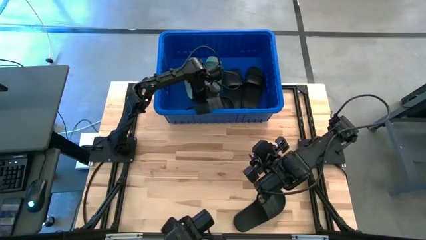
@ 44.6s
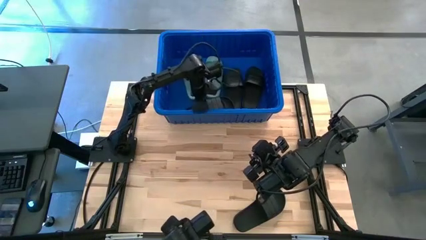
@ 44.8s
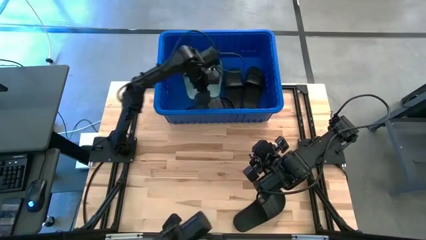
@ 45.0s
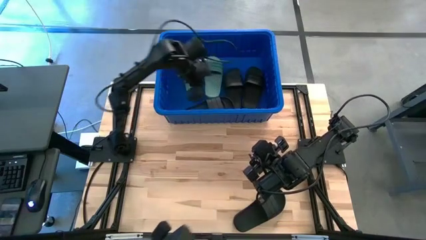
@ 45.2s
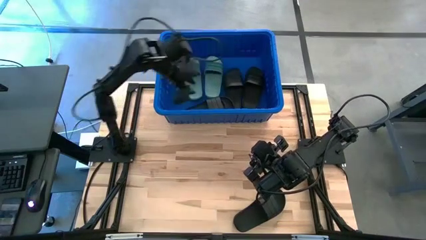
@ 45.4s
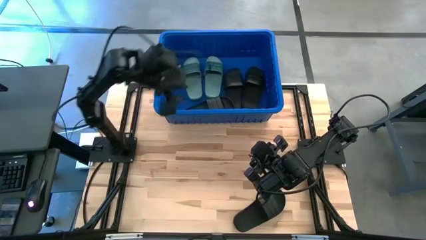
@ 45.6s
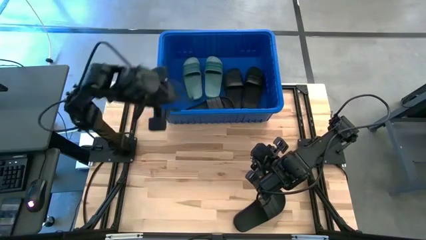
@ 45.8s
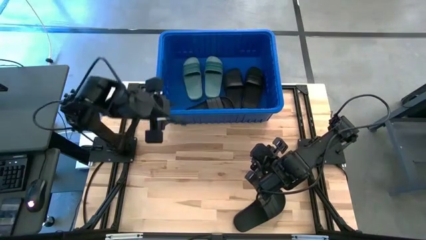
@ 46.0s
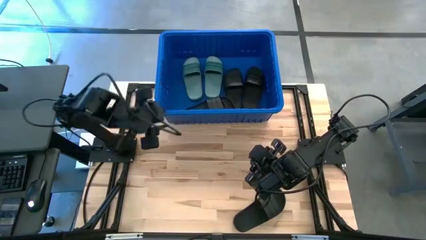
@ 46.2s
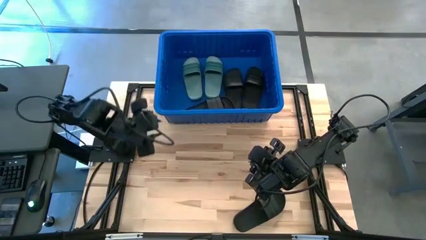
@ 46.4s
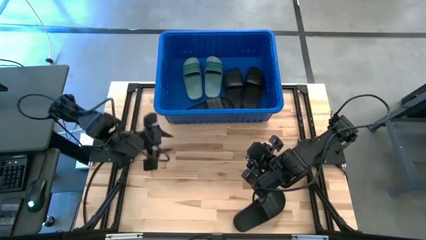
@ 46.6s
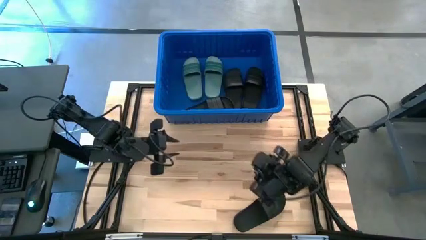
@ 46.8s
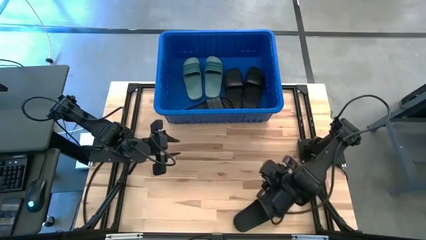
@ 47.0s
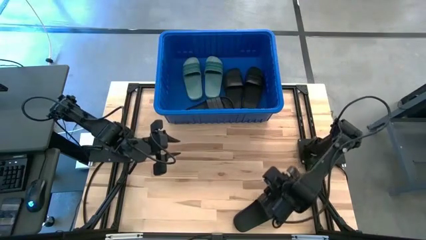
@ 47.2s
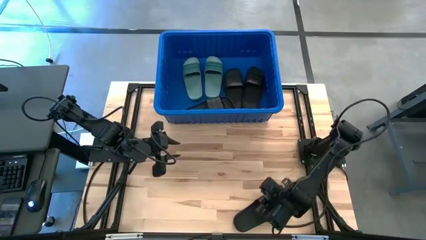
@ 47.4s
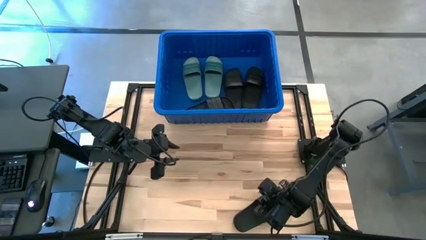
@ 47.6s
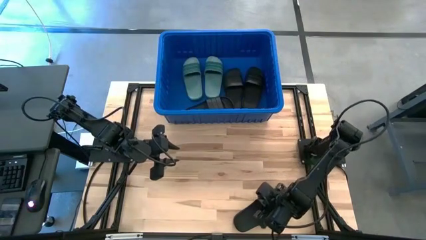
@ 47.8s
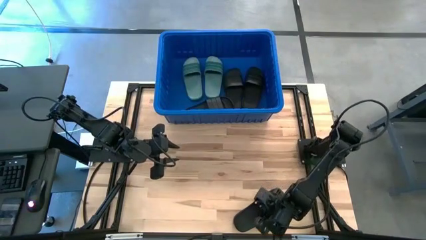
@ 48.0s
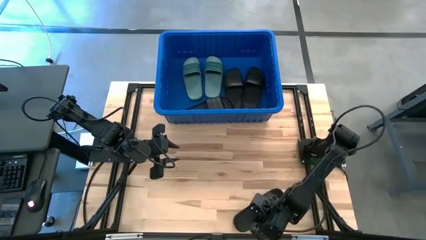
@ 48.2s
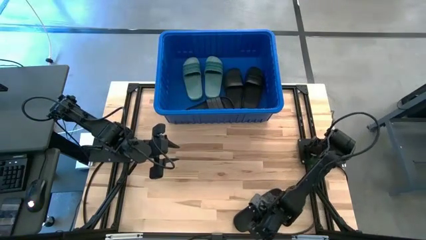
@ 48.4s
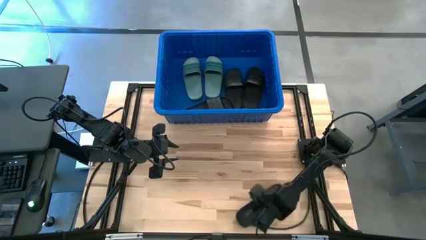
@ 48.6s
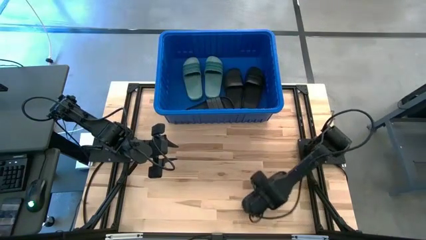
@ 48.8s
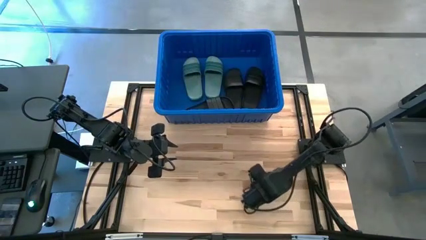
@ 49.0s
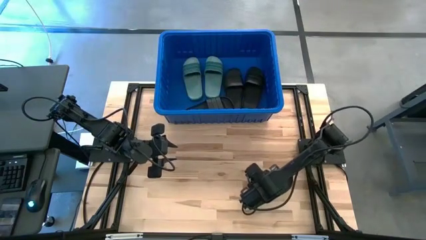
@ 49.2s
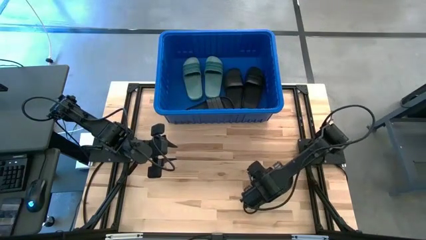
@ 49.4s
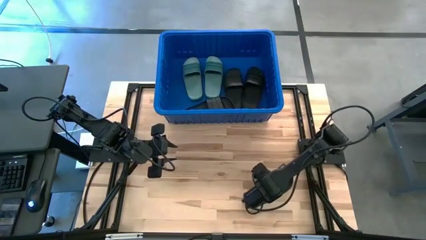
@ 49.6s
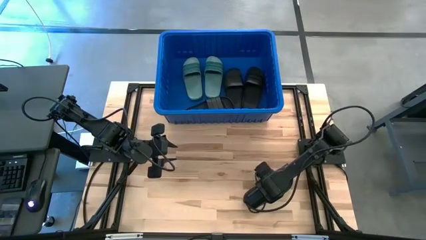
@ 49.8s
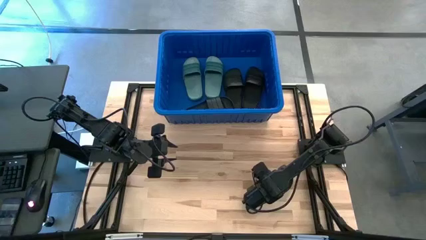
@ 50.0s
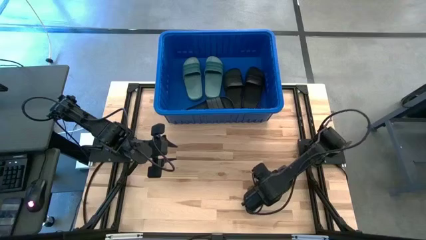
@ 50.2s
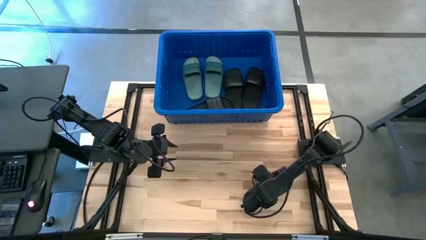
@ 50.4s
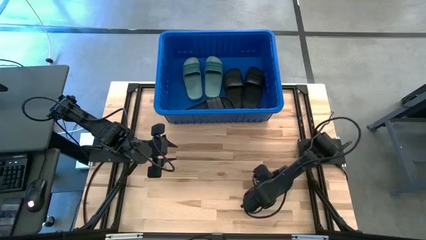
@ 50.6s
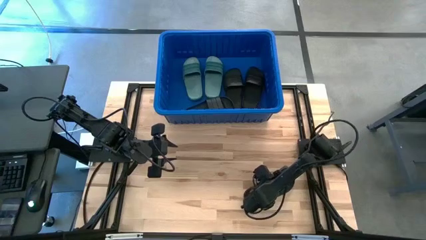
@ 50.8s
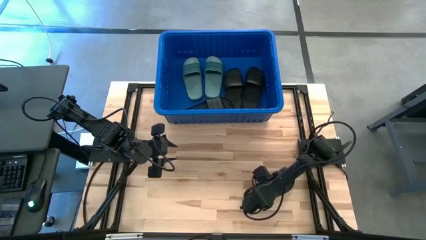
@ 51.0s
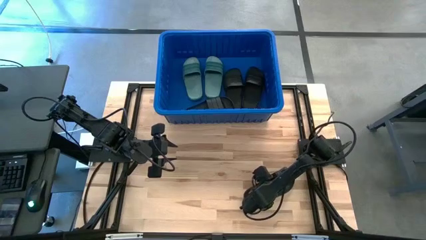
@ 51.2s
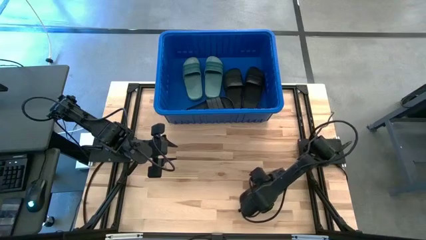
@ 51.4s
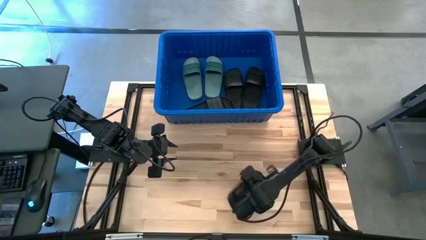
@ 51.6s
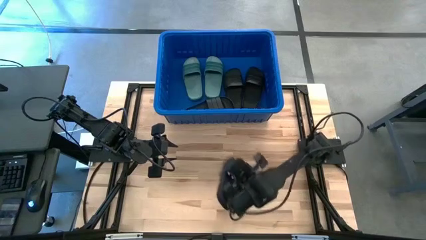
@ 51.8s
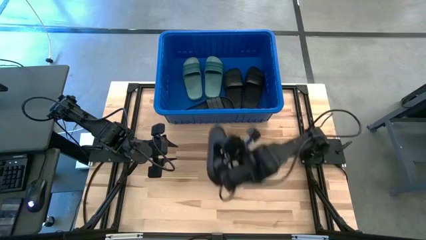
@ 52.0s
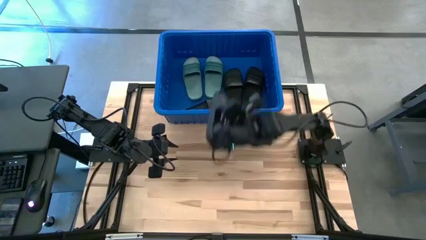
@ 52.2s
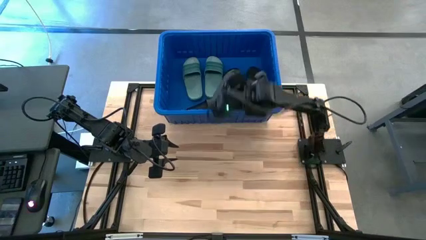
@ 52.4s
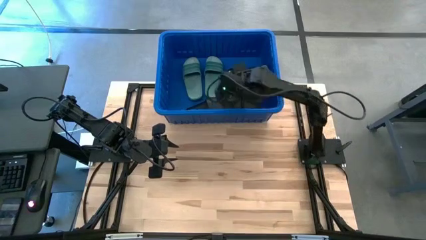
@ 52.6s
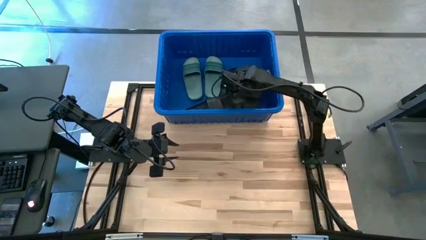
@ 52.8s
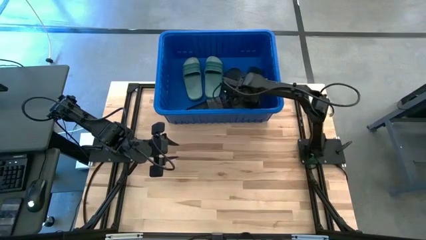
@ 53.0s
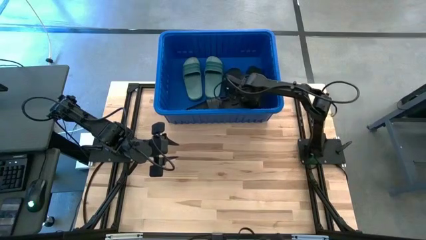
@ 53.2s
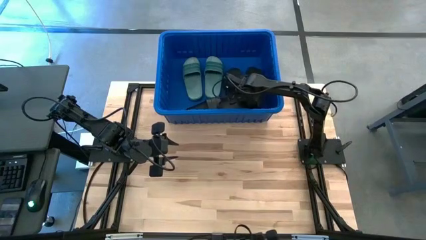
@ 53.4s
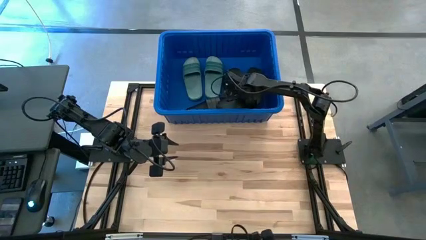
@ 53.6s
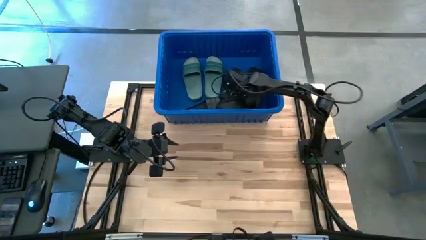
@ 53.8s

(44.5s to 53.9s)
Task: Pick and place slides into bin
Put the black slide into the bin

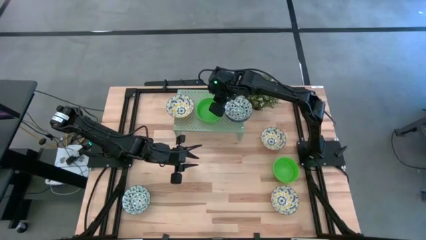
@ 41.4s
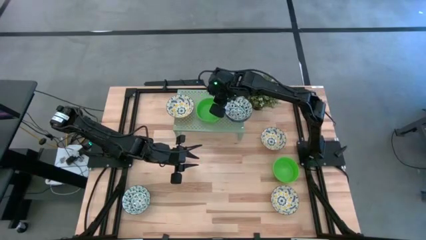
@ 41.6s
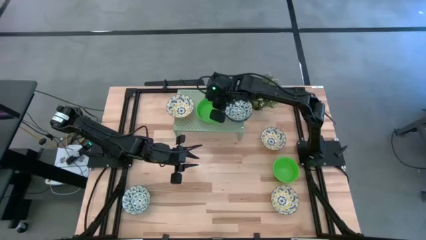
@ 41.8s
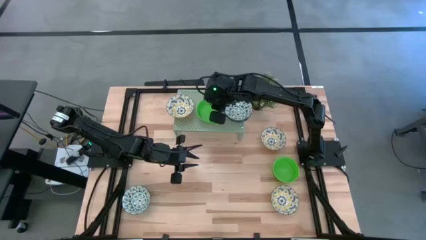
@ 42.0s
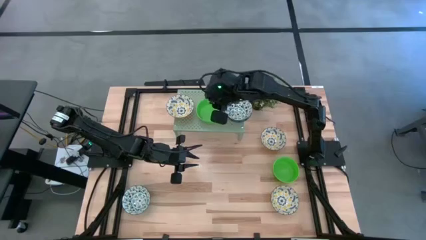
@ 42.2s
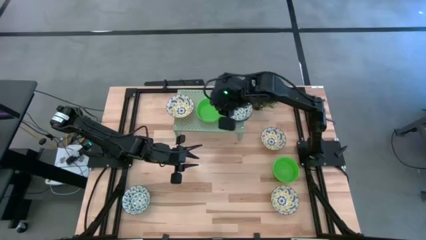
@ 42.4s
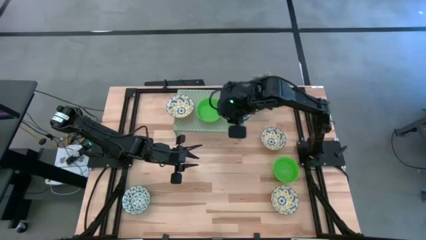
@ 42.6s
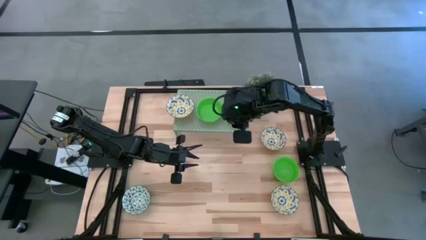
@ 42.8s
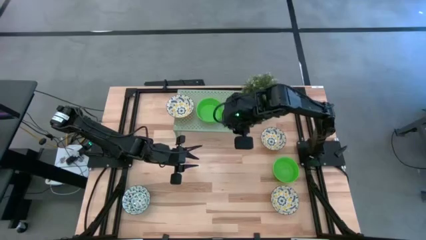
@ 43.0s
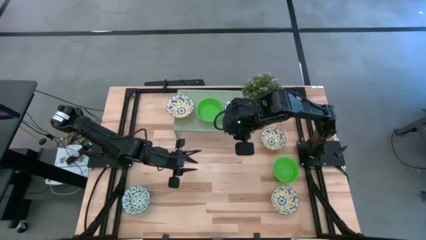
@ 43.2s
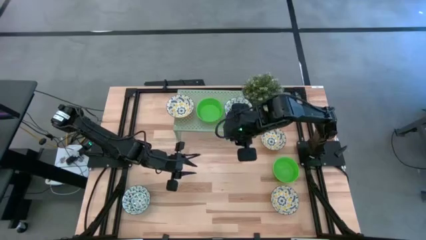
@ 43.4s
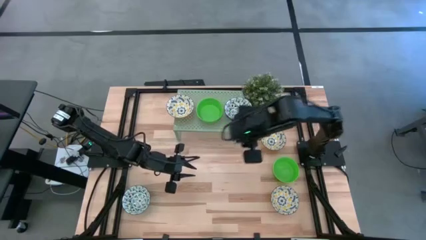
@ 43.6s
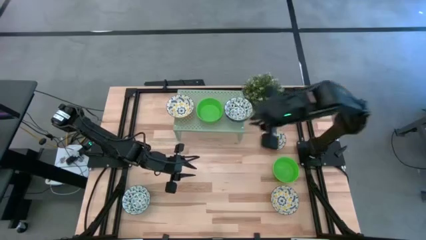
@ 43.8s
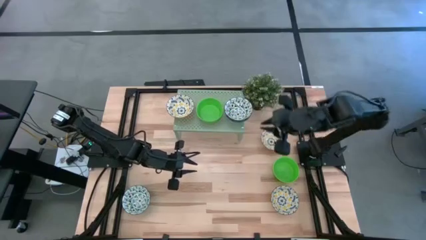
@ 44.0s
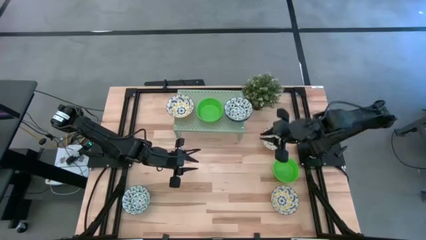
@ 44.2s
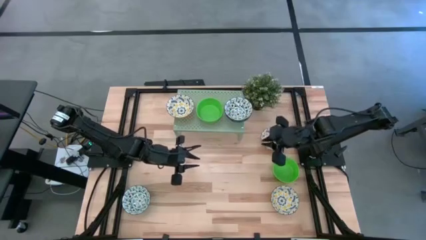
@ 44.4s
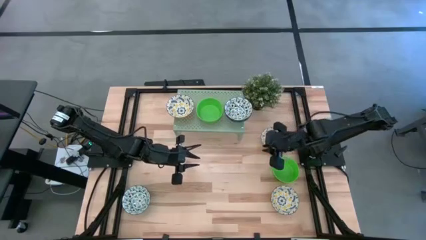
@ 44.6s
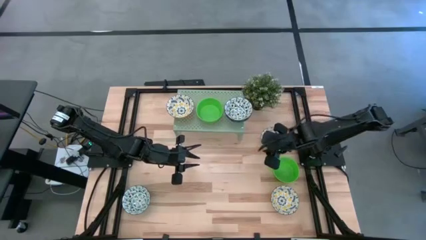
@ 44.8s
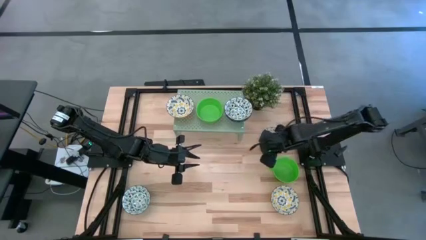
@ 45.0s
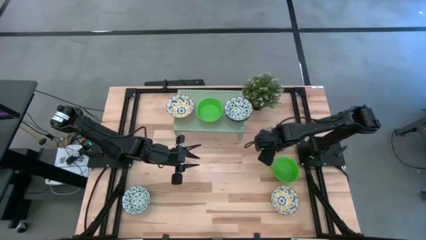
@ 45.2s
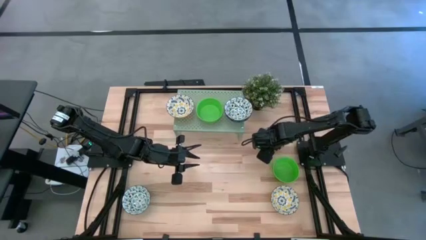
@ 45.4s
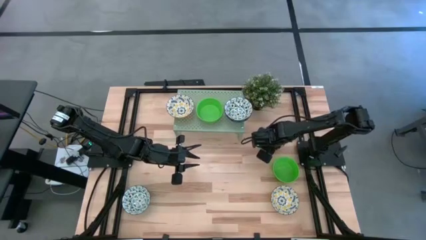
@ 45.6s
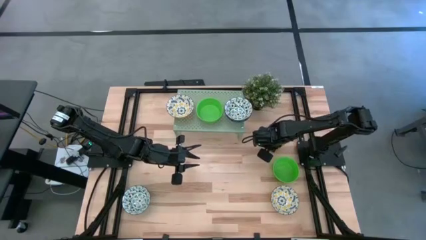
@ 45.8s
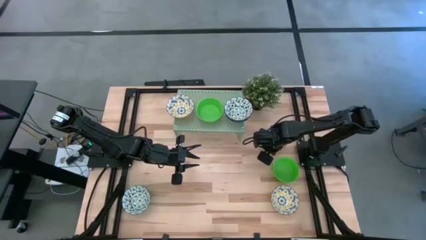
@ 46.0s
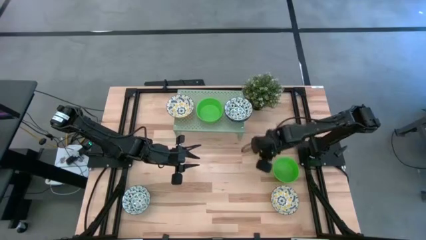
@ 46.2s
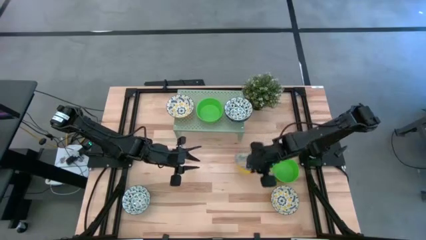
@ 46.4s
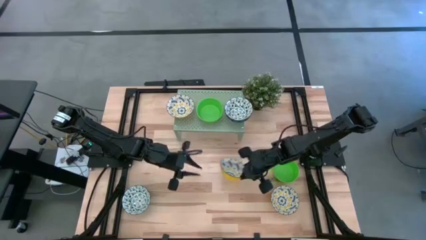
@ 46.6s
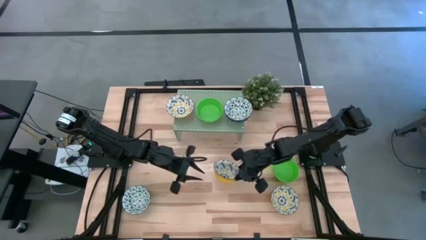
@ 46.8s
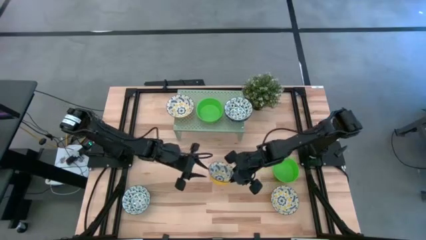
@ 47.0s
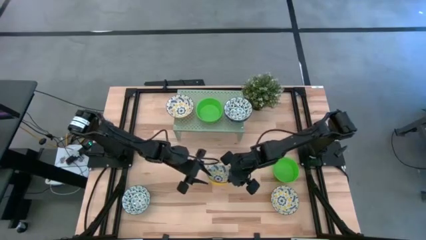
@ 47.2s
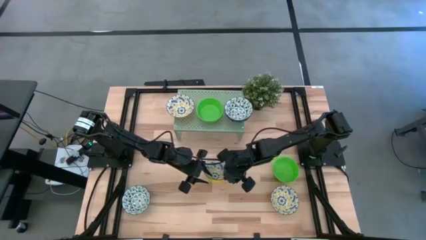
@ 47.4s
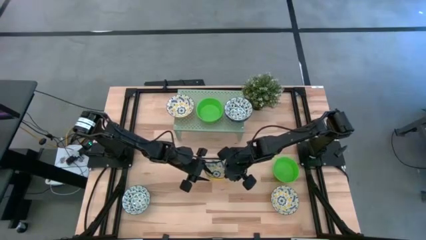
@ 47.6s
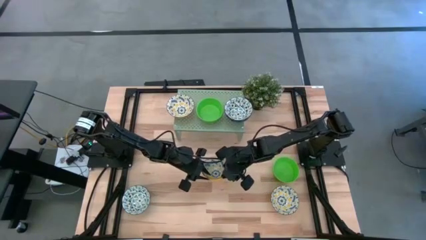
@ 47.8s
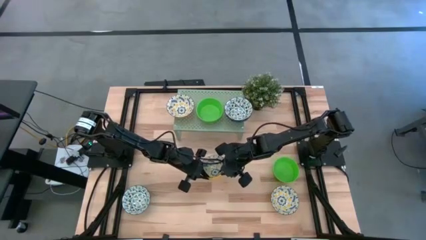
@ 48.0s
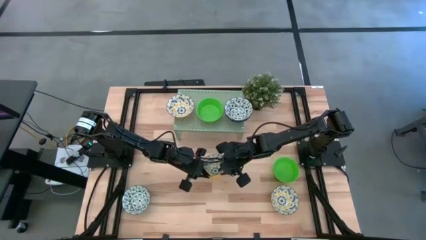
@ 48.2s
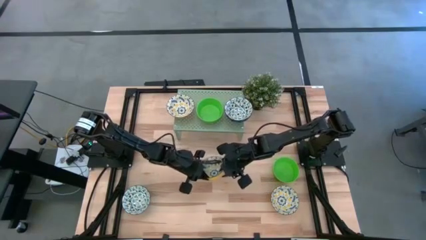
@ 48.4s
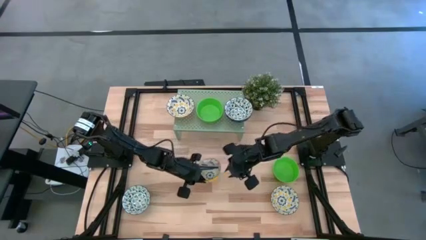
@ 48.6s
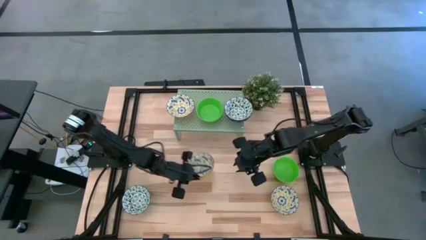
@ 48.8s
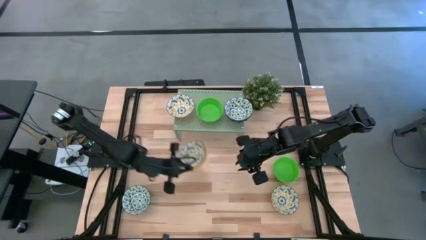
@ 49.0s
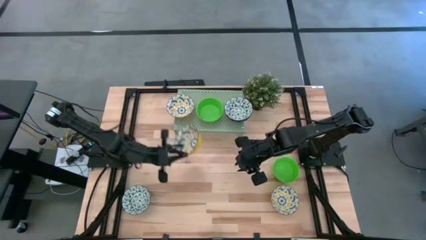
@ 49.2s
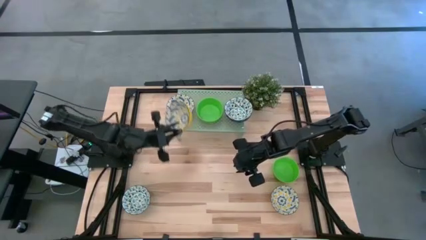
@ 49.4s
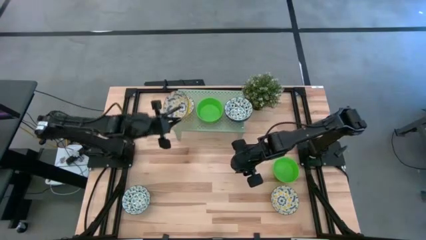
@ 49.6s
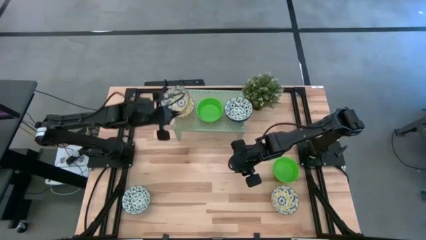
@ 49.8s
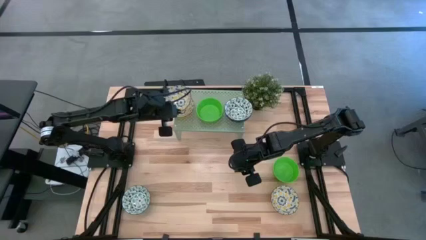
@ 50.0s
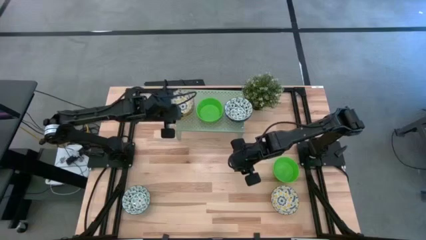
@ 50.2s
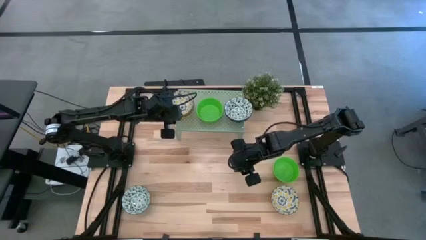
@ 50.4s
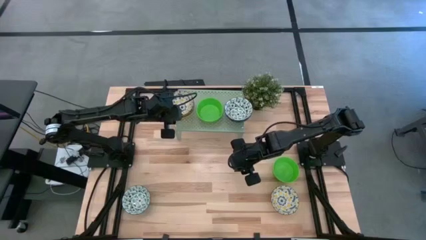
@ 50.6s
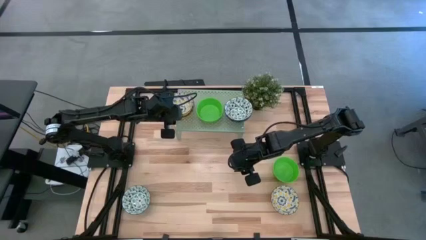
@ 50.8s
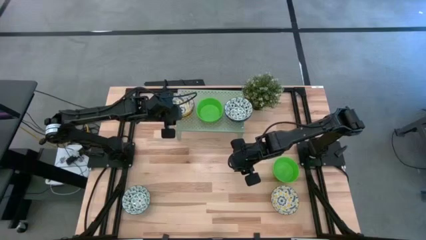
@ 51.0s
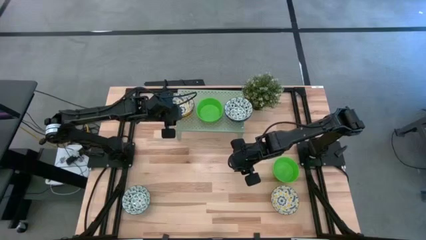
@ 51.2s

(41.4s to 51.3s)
Task: Pick & Place Mini bowls
Stack the top yellow and white bowl on top of the yellow and white bowl on the shelf
